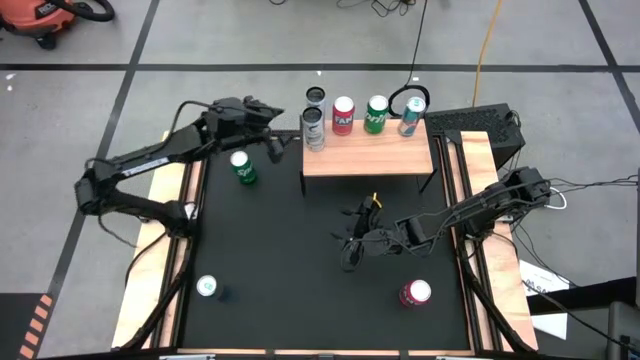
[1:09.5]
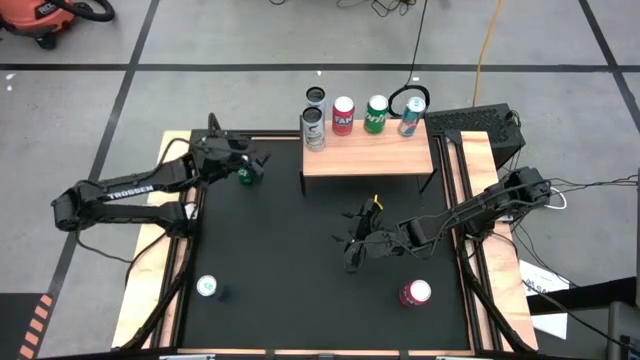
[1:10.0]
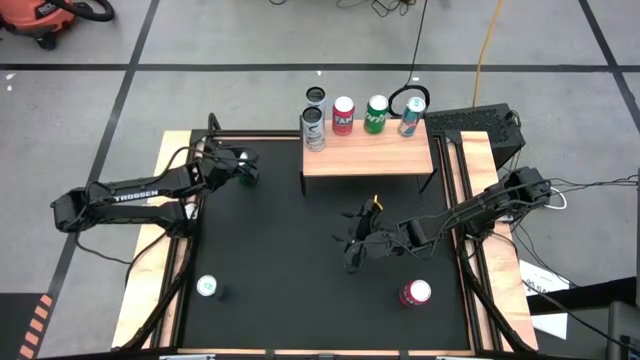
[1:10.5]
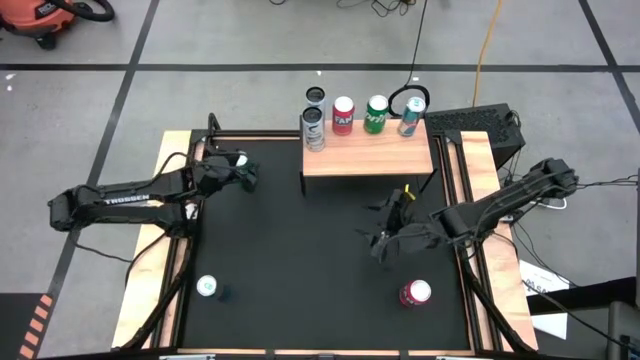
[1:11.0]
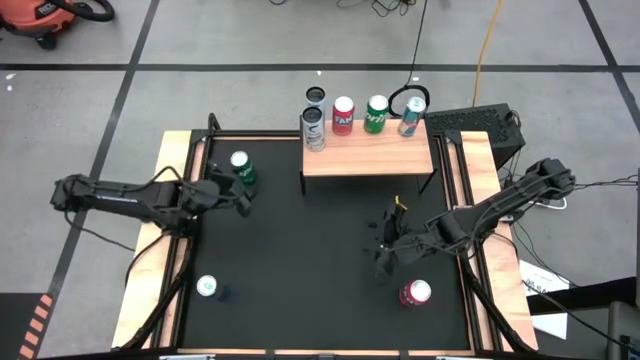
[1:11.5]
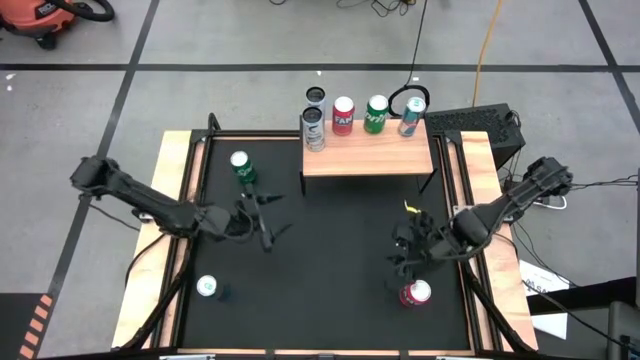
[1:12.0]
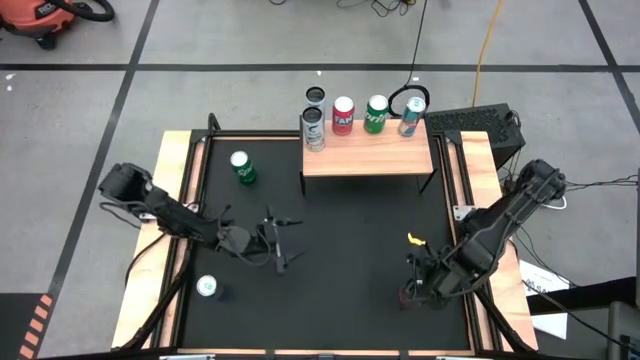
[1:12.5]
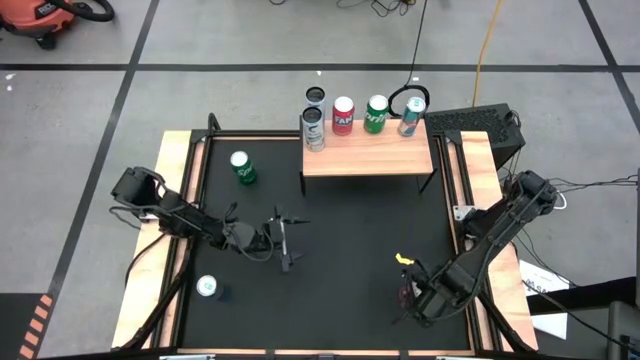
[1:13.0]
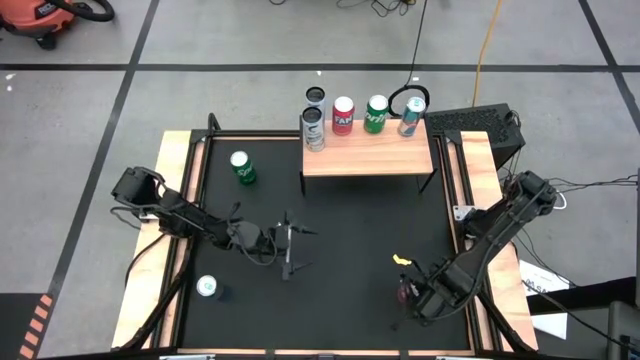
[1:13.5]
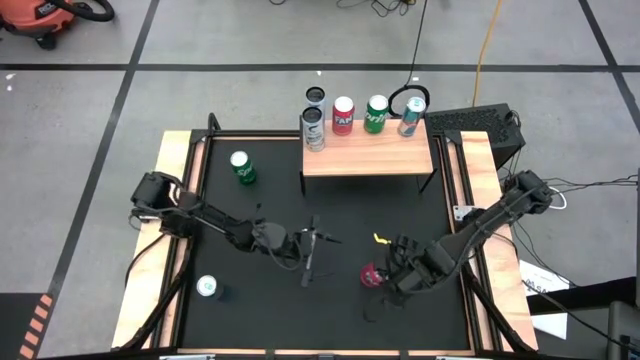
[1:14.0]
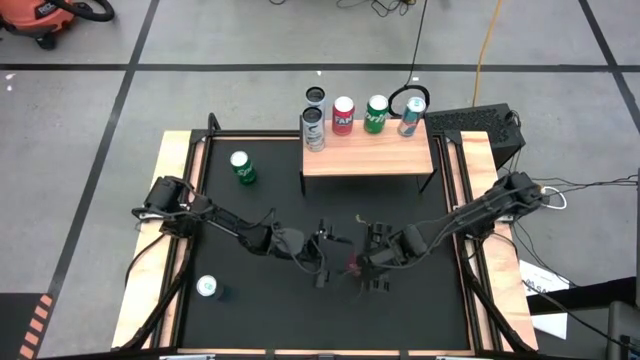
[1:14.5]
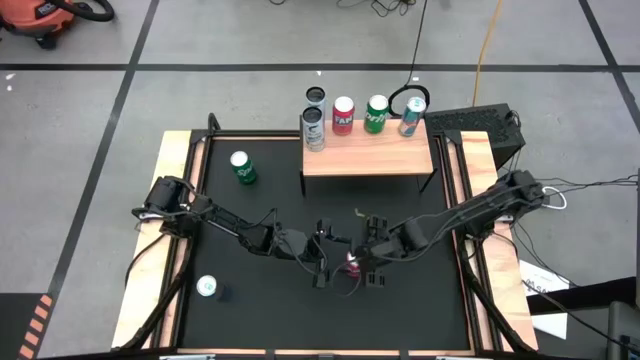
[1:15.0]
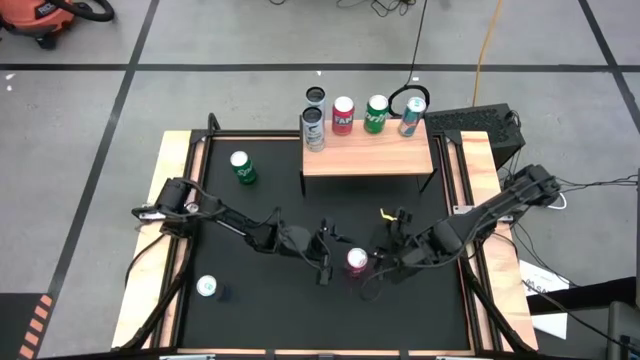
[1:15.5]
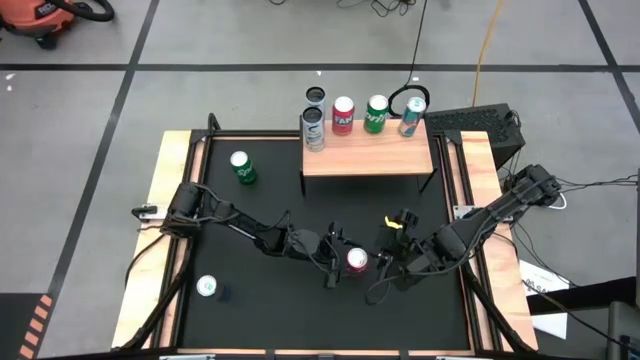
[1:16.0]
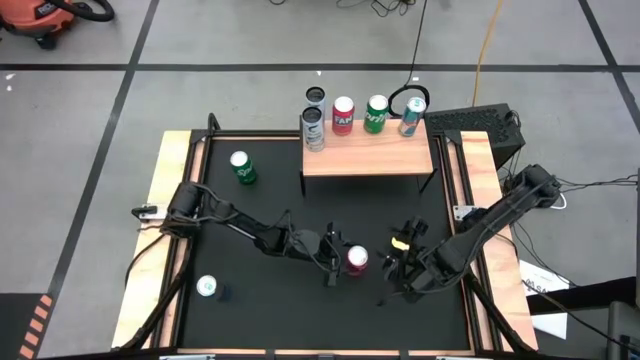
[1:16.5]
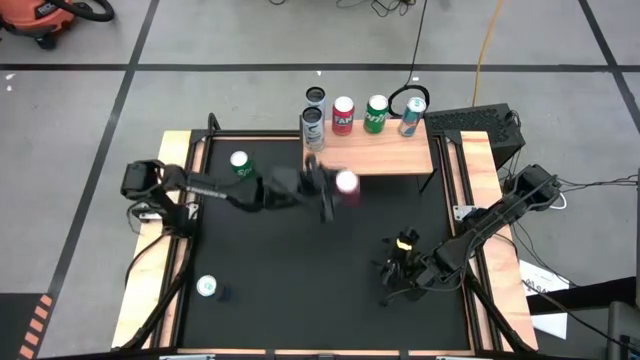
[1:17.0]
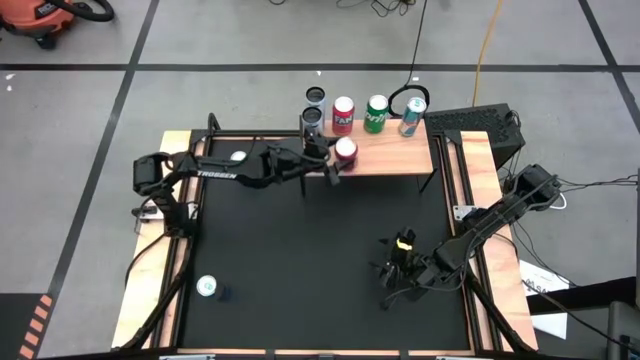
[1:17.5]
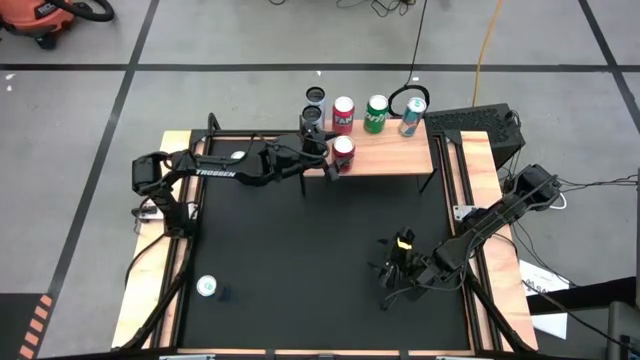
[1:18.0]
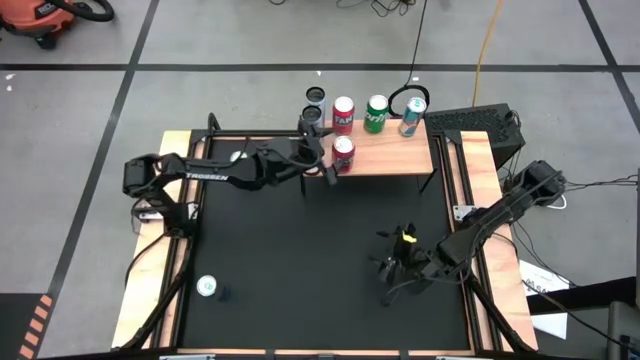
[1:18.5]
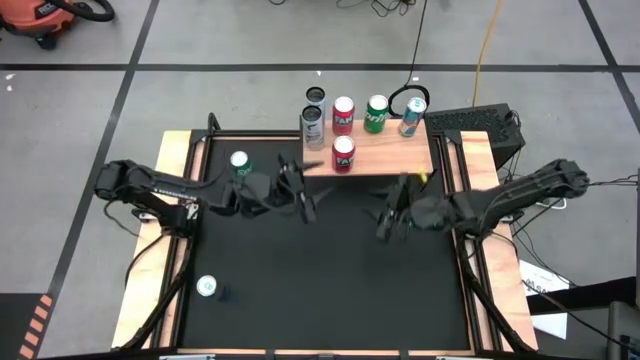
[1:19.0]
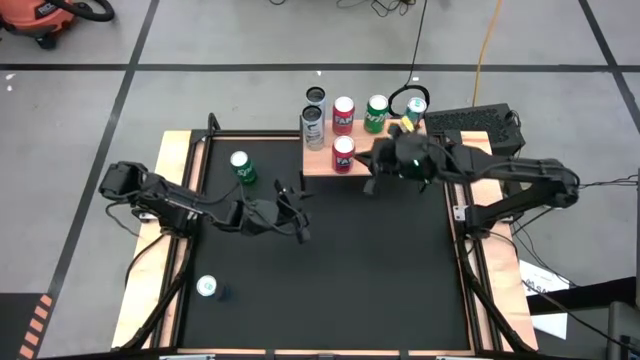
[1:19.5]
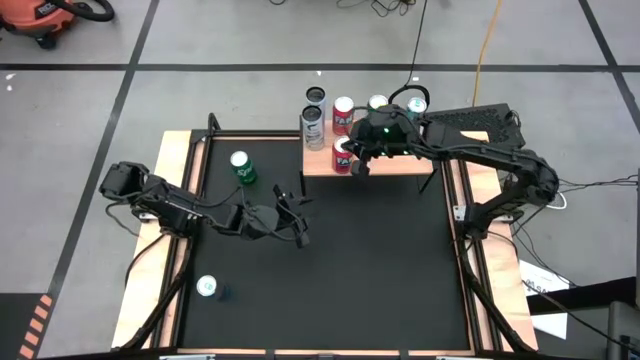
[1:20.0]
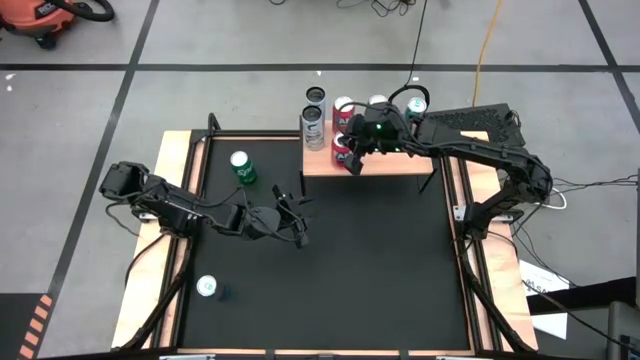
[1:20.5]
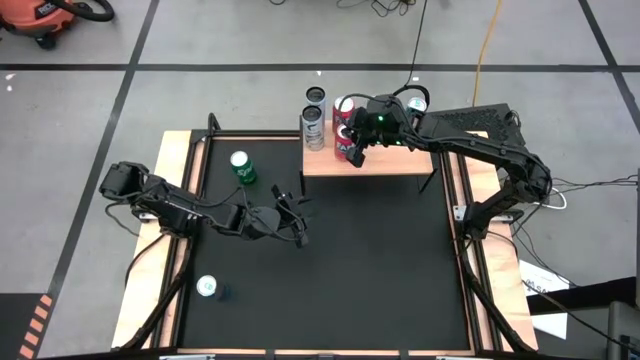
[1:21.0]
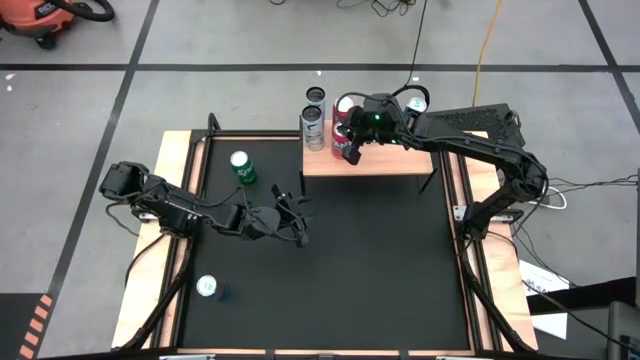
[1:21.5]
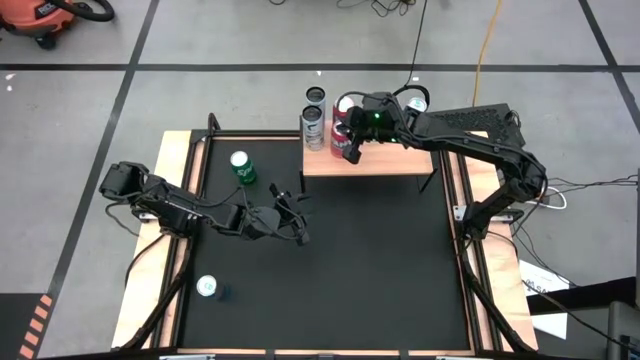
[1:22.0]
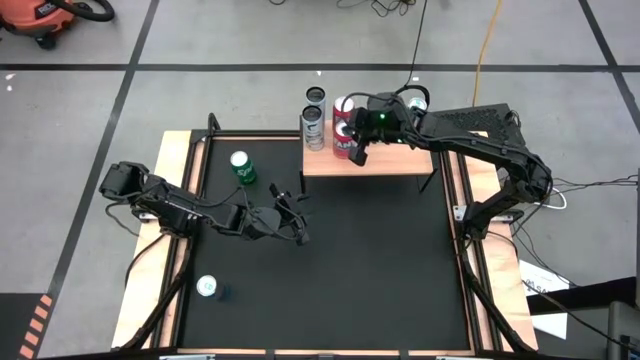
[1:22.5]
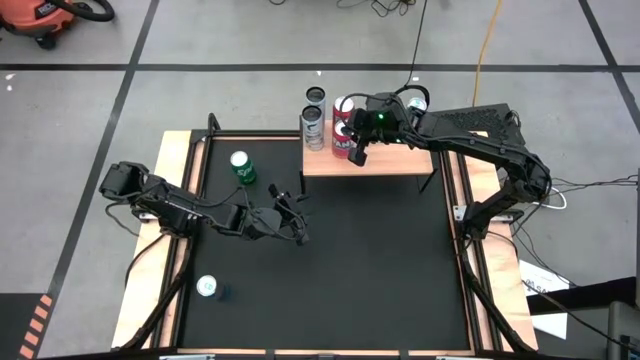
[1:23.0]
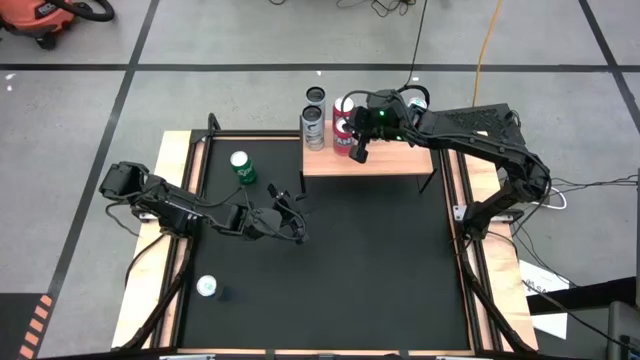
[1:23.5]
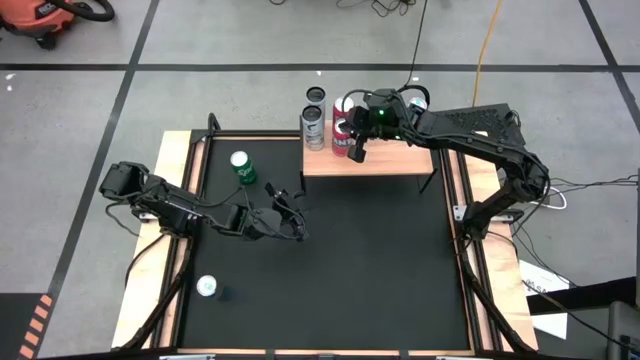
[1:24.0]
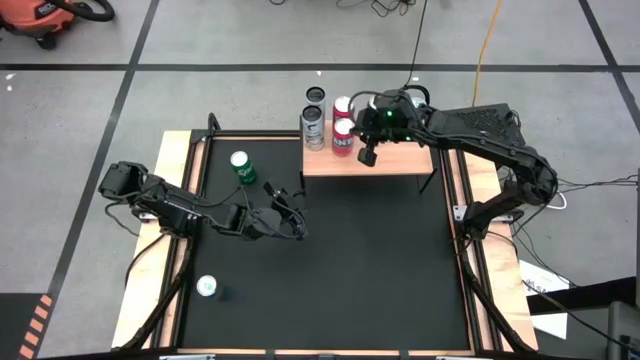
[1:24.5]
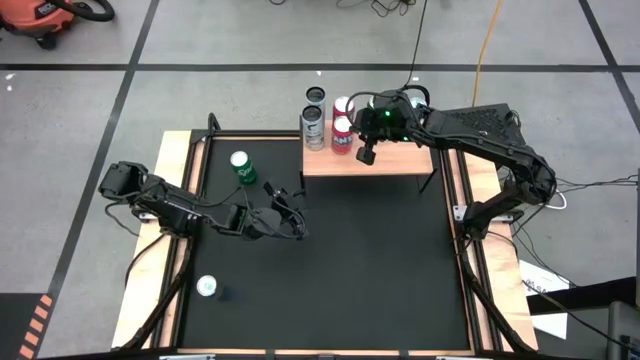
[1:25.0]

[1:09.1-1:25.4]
Task: Place canned beverage on shelf
Put the orange soda can on the shelf aligned with the other orange soda can

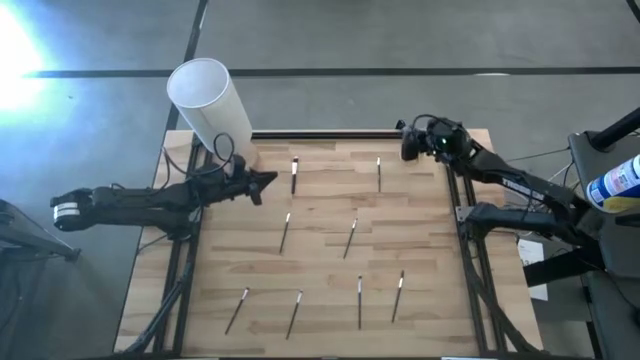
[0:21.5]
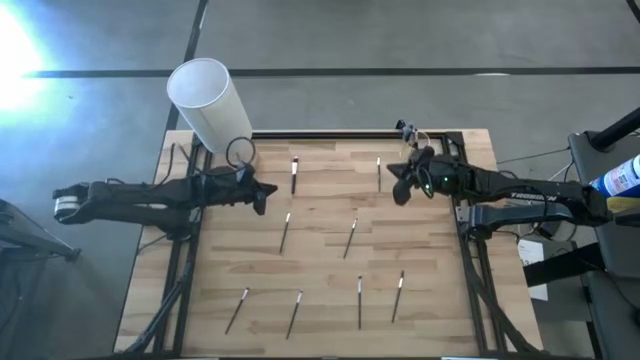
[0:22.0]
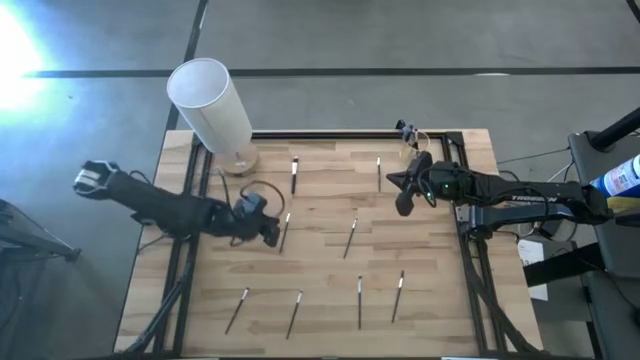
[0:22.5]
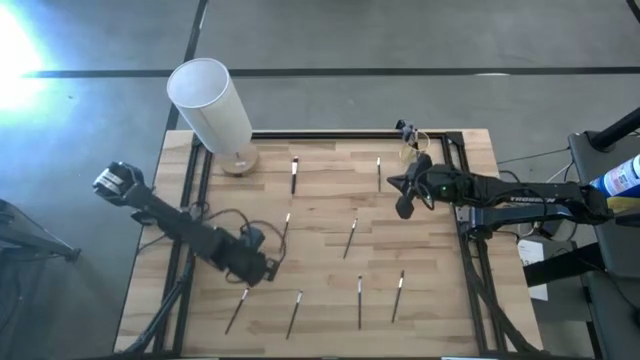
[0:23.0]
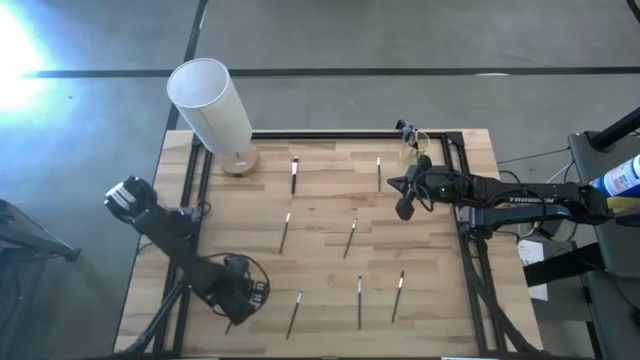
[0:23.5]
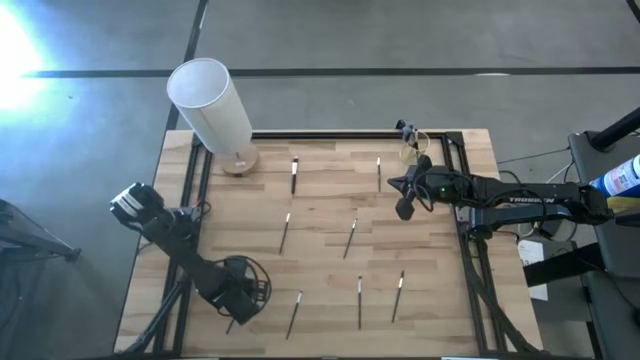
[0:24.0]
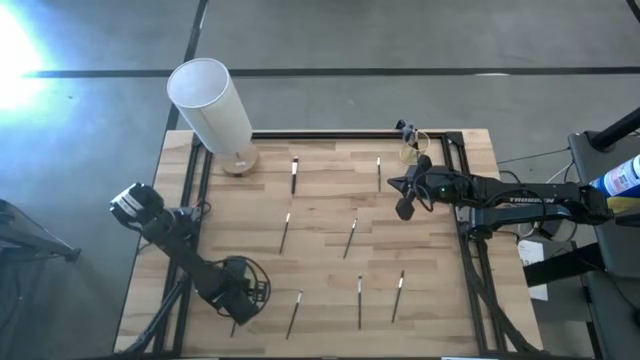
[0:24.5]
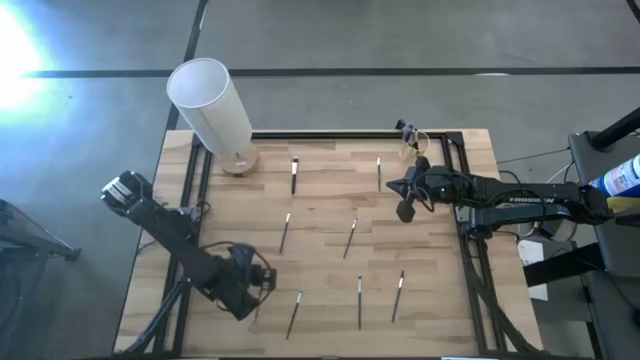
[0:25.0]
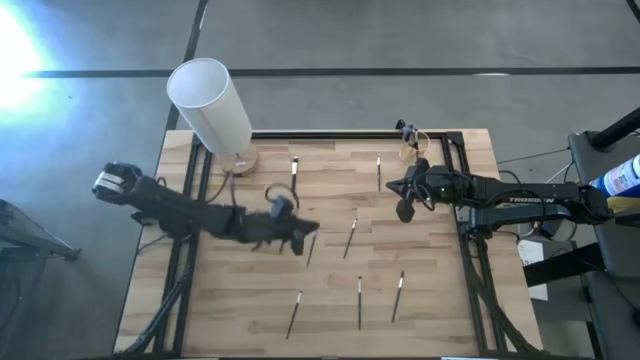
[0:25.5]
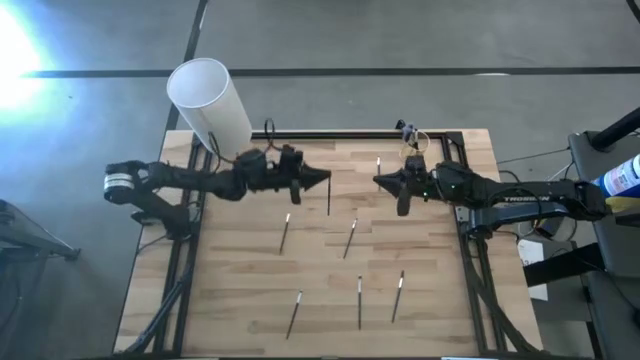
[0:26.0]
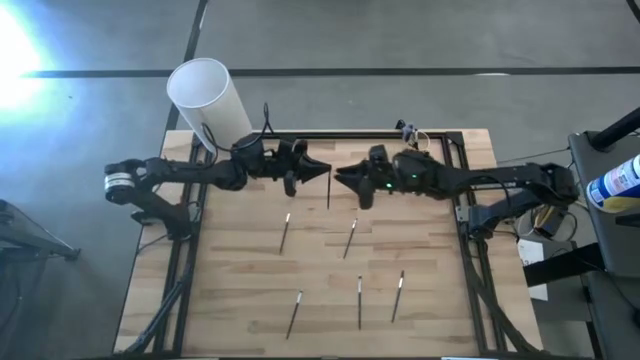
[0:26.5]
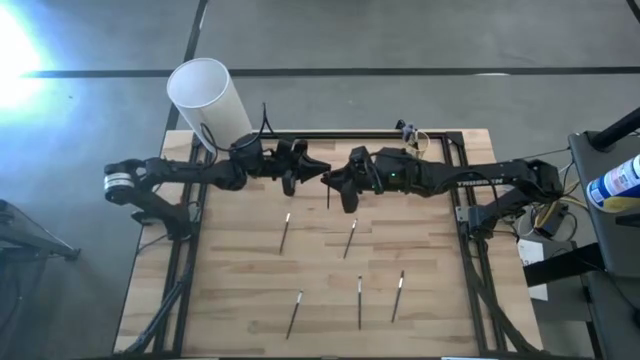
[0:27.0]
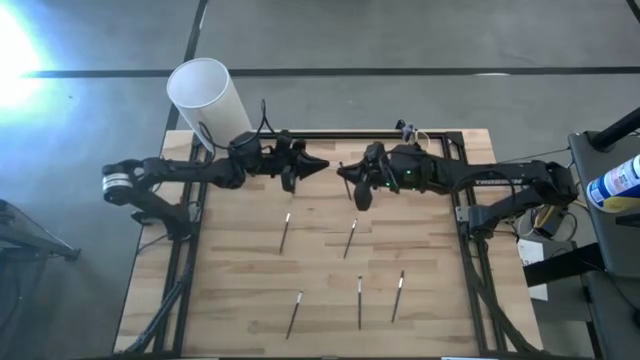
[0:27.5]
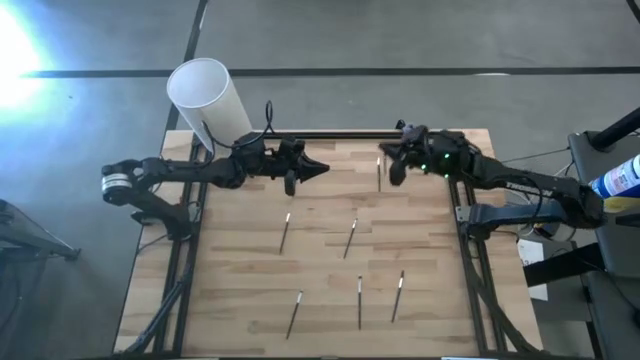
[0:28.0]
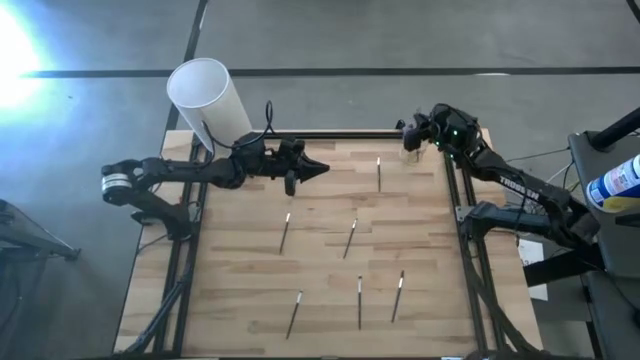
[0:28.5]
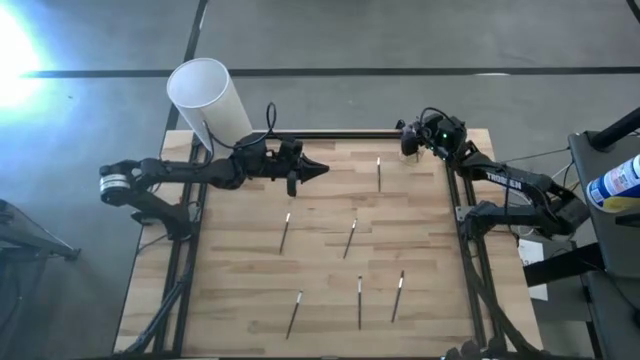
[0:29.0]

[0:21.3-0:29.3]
Task: Put items in baskets/containers
Put the eyeshadow brush into the yellow container
